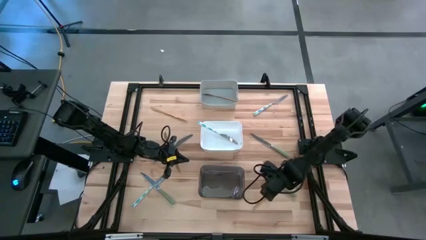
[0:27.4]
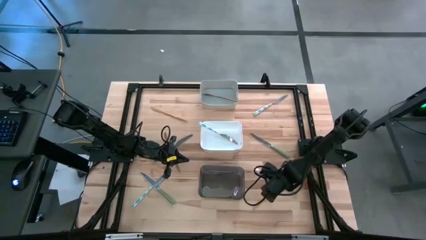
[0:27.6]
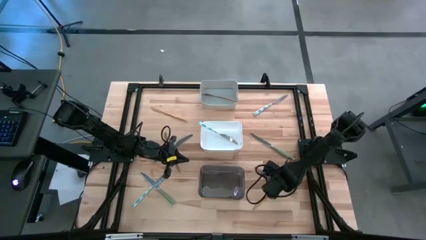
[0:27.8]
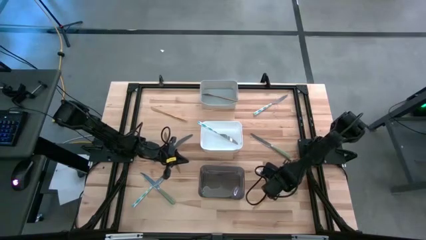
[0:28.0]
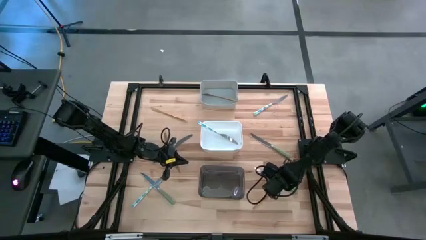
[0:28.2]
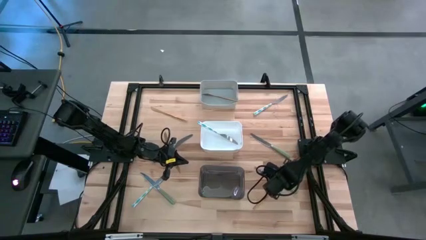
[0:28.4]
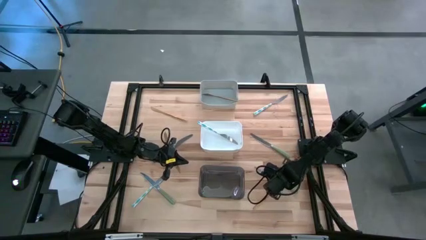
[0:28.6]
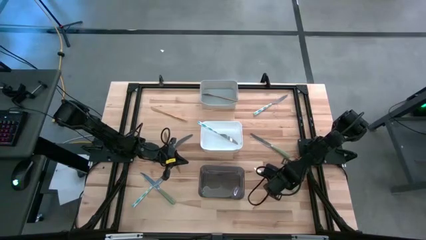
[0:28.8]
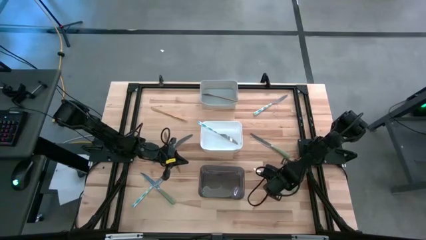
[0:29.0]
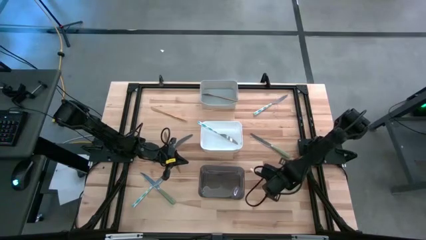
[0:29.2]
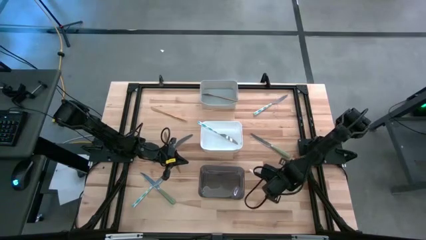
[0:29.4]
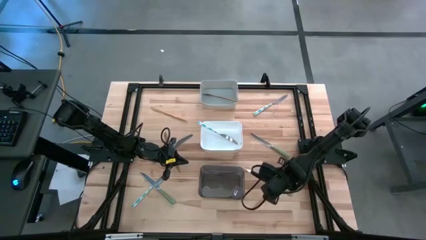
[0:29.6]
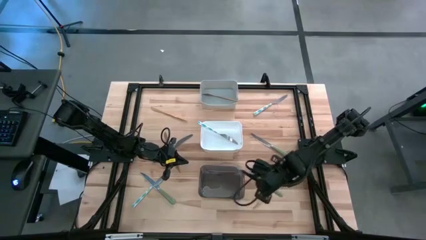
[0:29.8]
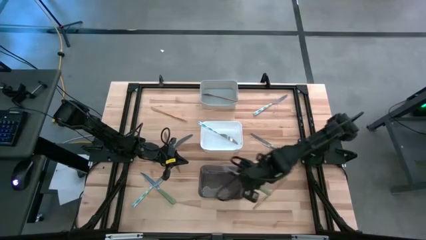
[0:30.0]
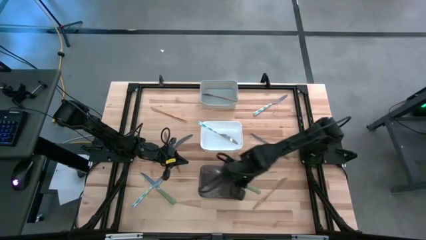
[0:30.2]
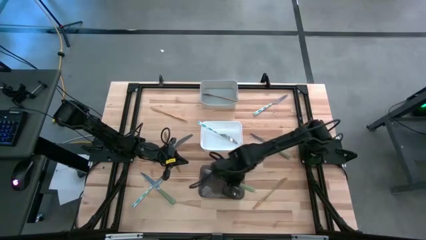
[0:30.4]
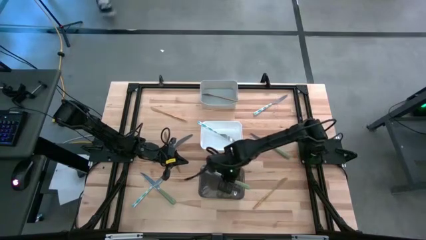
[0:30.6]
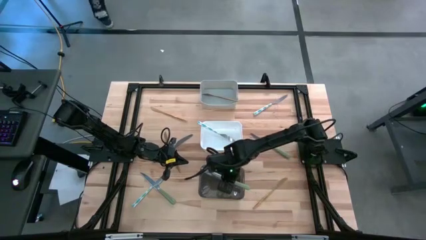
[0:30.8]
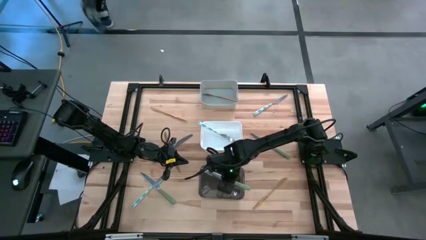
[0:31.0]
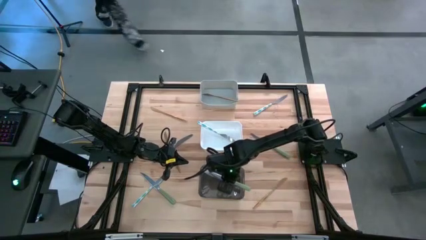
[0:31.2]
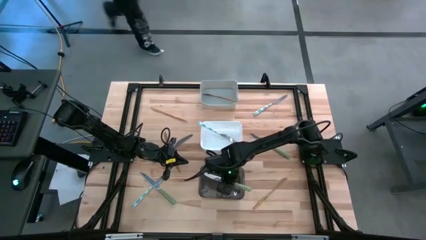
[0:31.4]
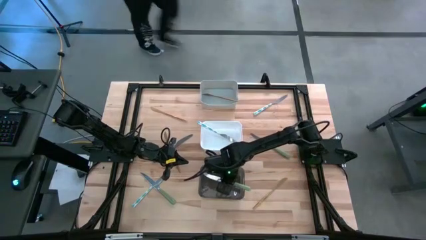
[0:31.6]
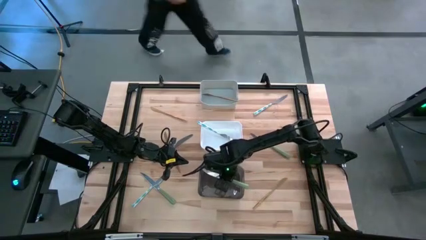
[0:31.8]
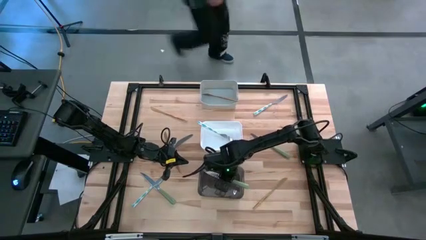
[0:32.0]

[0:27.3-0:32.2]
Task: Sort silverware by color (type)
Put the light green table knife into the black bin

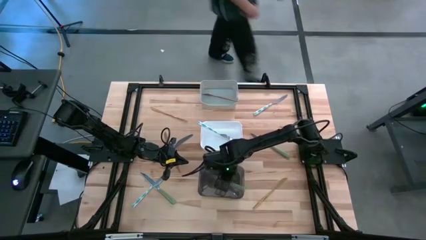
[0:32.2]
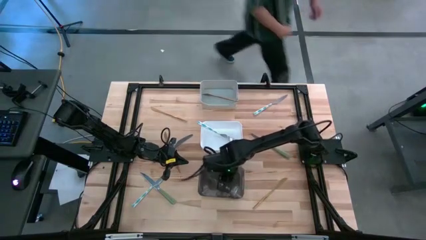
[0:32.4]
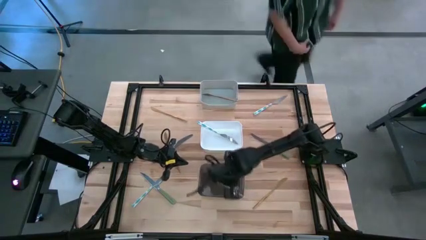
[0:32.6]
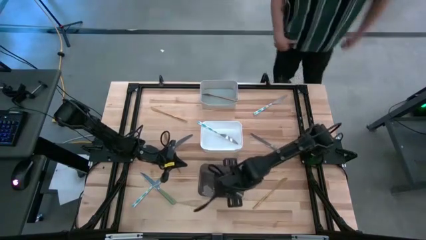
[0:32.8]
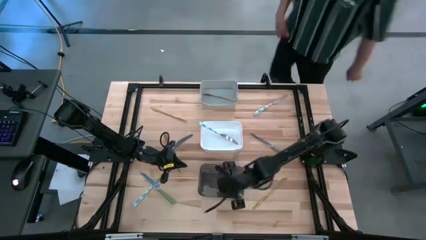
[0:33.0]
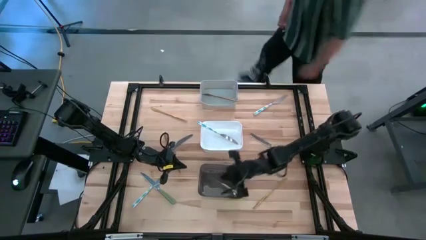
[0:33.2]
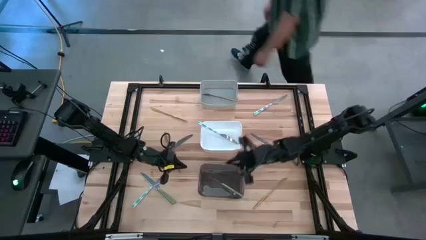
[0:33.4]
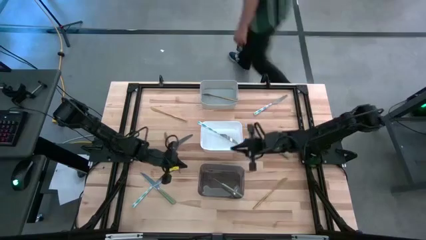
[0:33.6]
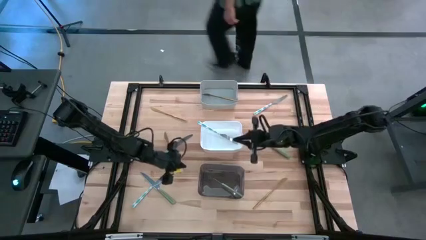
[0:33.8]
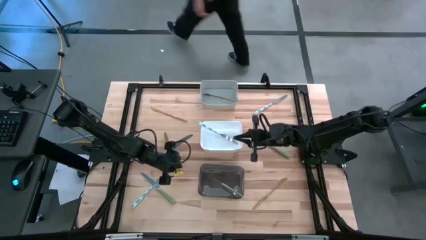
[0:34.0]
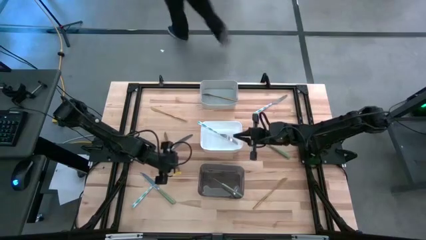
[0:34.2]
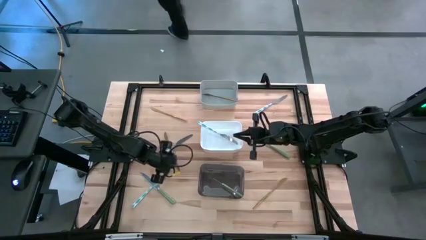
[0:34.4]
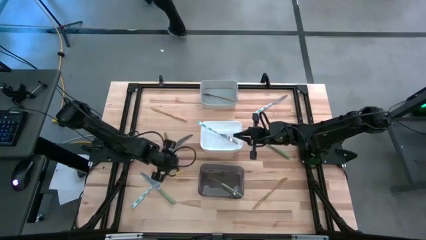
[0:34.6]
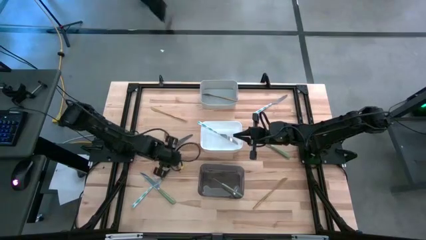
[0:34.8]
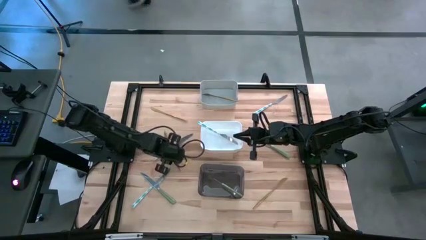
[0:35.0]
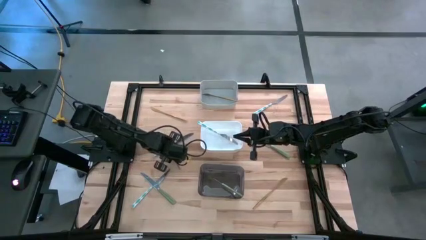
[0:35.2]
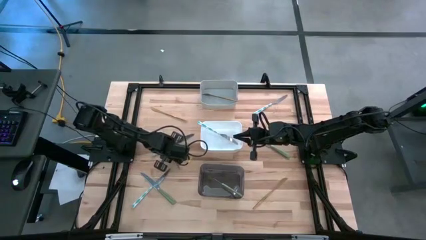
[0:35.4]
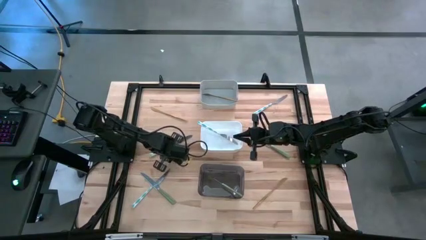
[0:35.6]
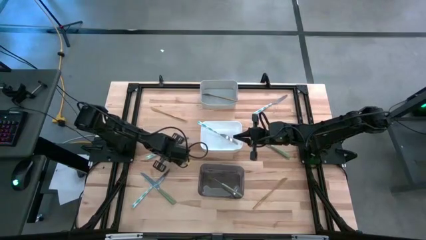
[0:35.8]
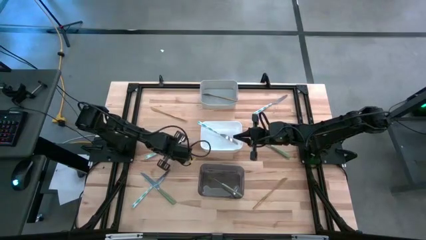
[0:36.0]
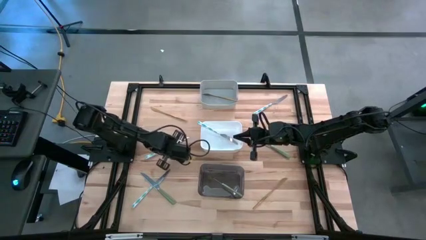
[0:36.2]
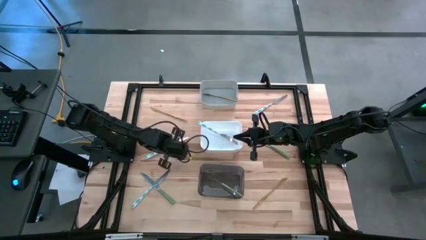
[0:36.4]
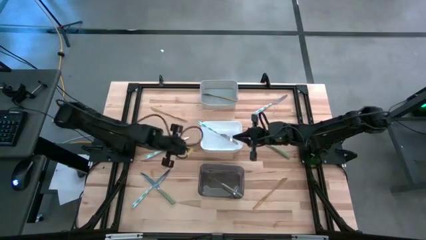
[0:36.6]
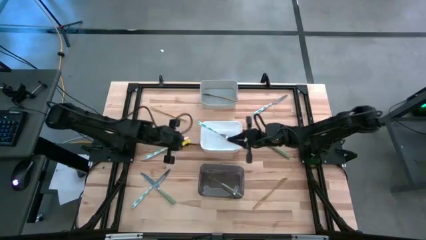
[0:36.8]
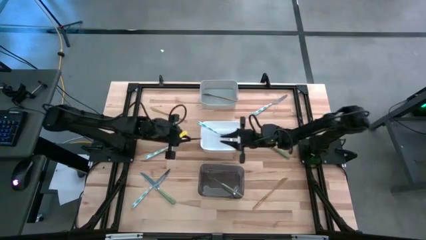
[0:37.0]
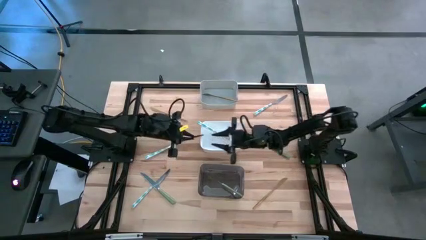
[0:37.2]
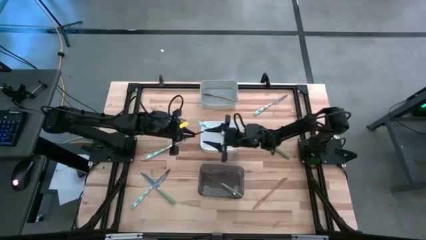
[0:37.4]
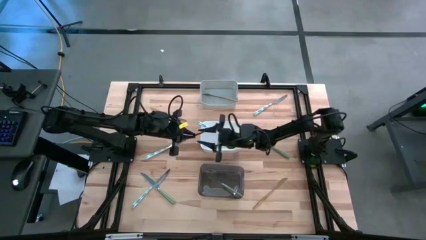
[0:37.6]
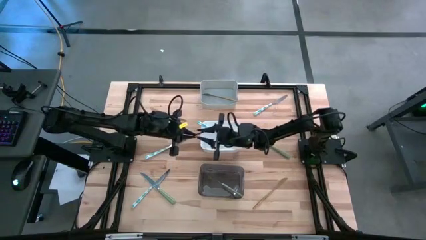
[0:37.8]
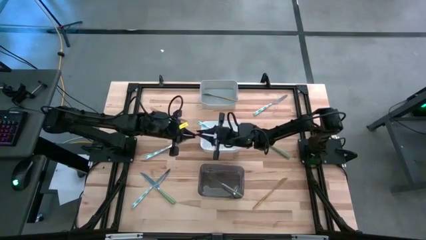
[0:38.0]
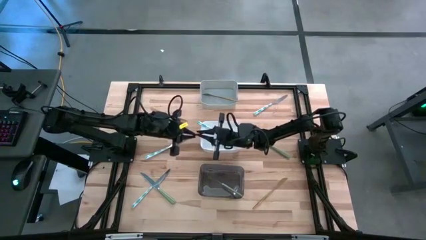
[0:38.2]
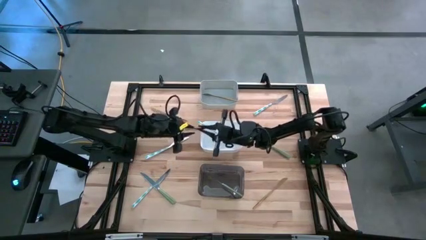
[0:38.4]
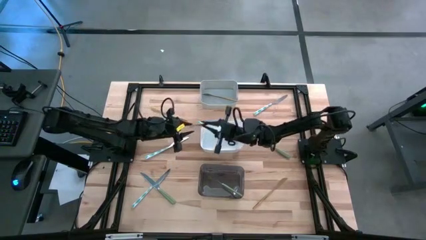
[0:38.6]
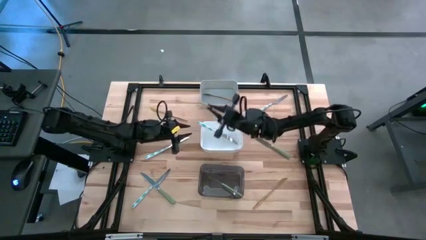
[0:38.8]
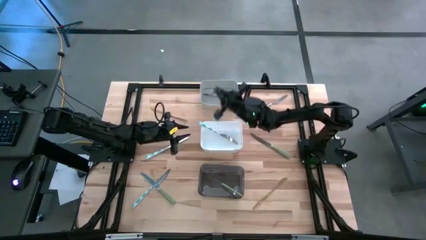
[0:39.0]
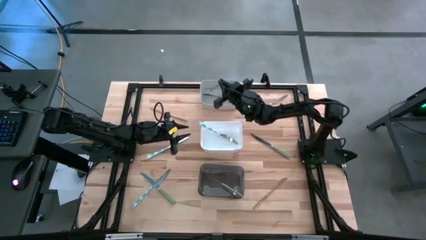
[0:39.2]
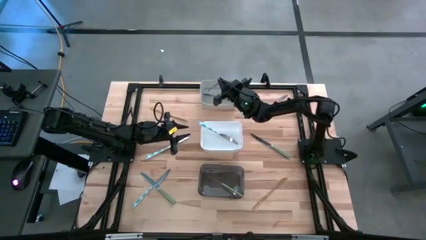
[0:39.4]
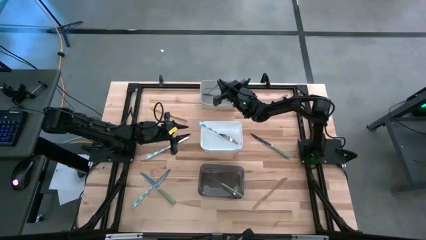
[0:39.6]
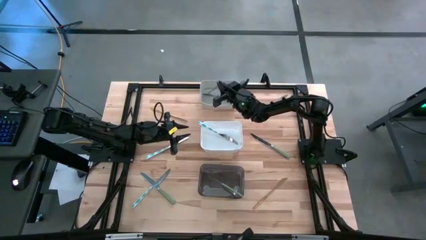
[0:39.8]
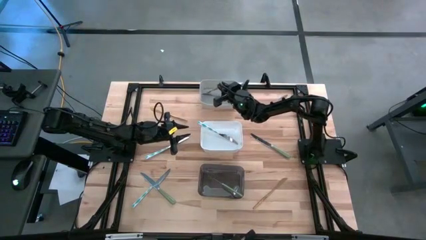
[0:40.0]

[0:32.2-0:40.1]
Put the gold table knife into the gray bin
